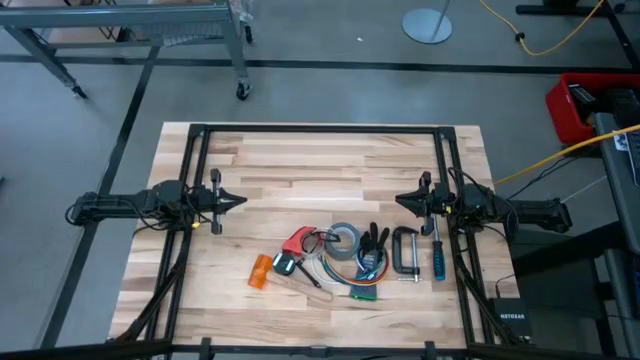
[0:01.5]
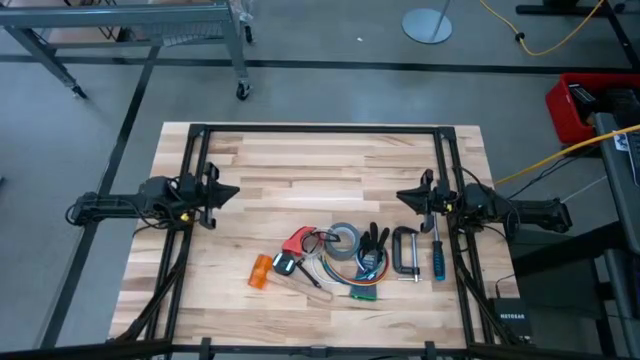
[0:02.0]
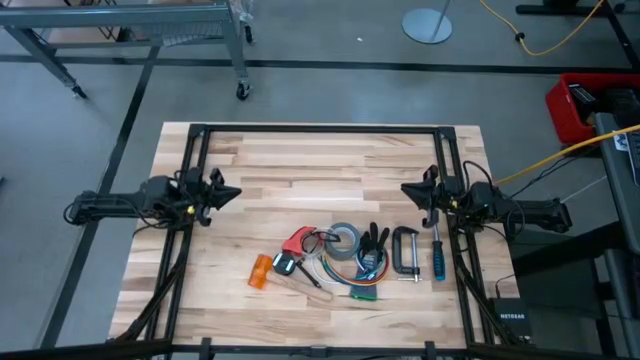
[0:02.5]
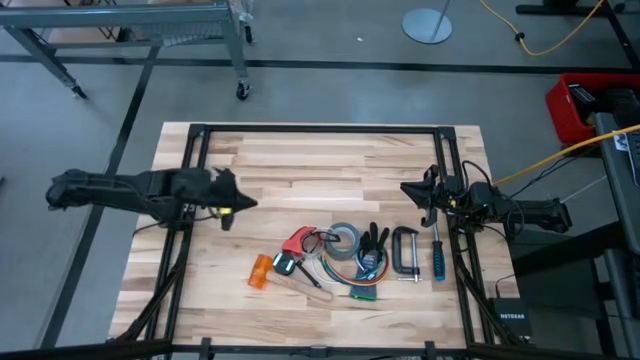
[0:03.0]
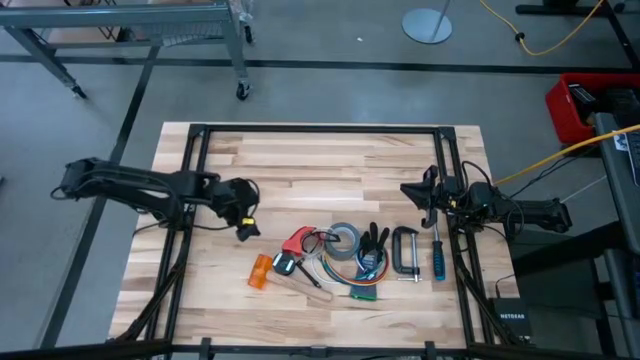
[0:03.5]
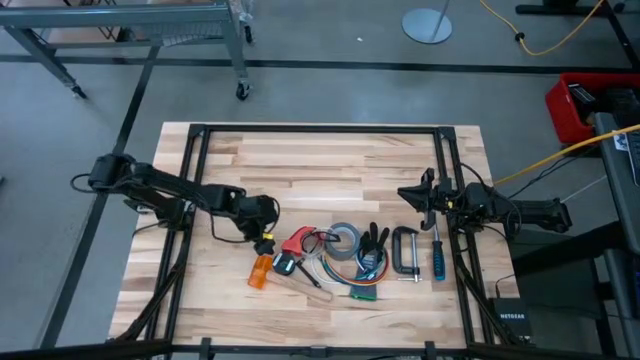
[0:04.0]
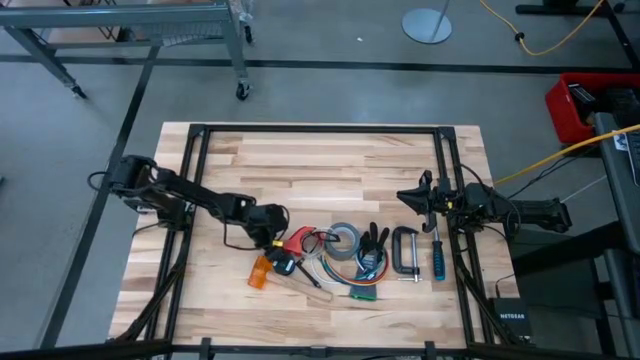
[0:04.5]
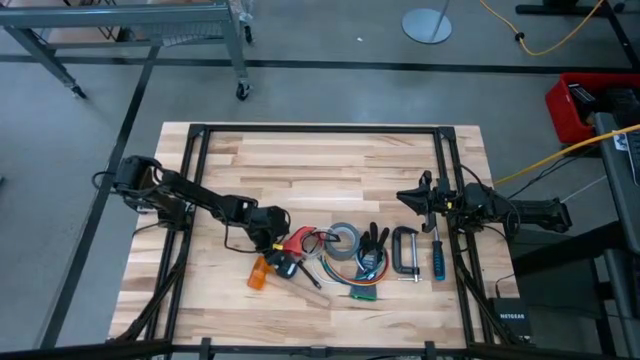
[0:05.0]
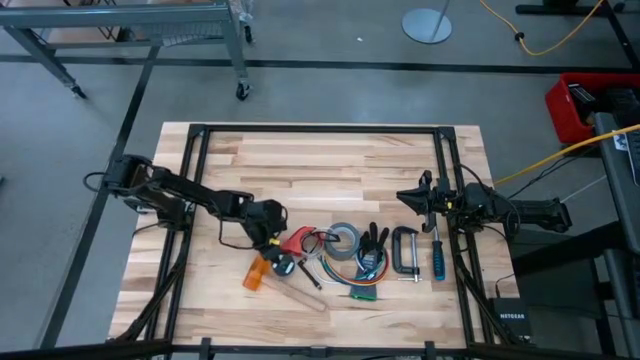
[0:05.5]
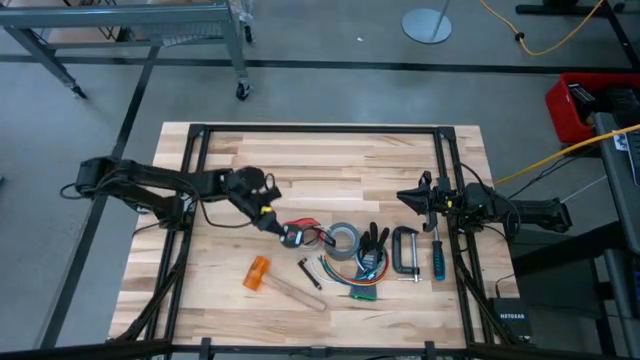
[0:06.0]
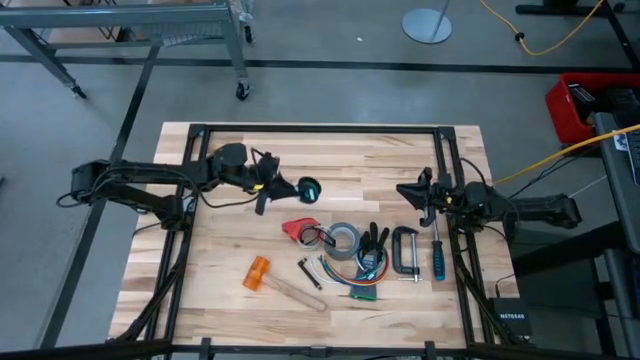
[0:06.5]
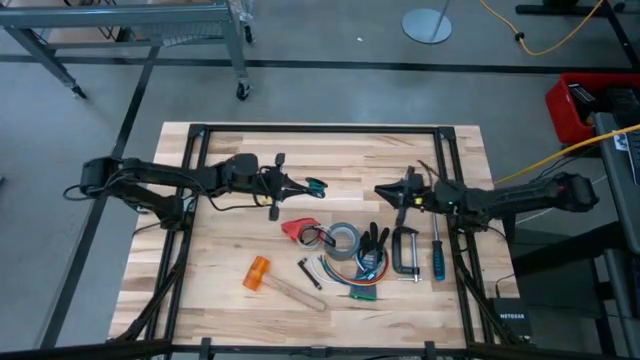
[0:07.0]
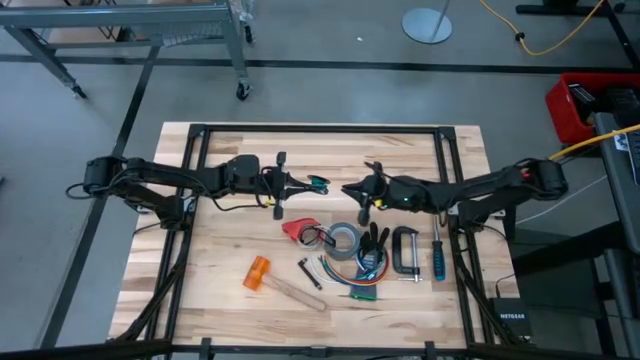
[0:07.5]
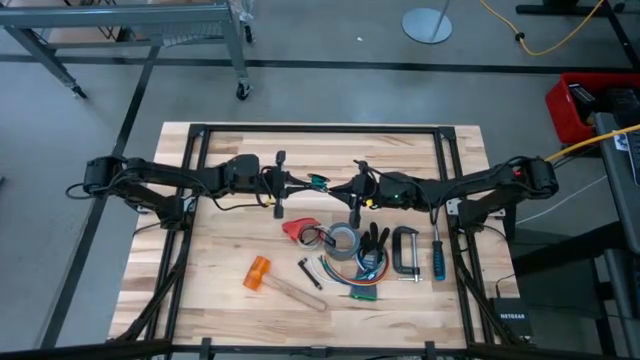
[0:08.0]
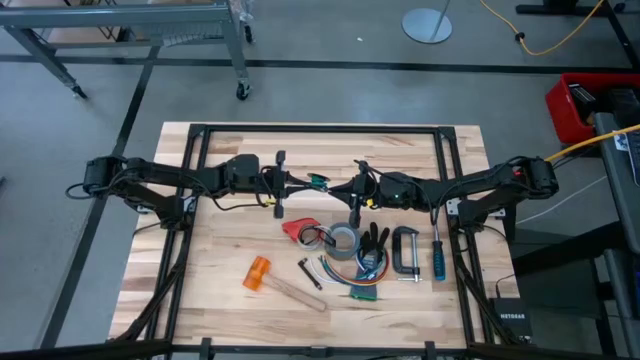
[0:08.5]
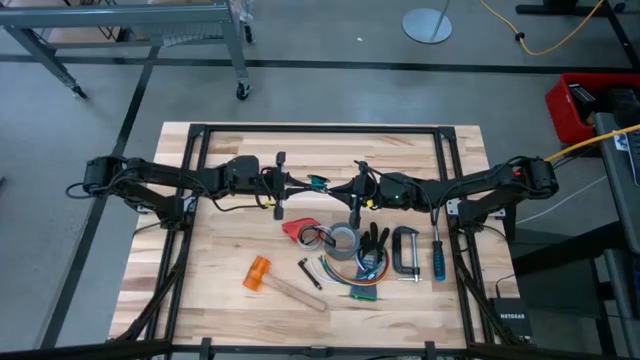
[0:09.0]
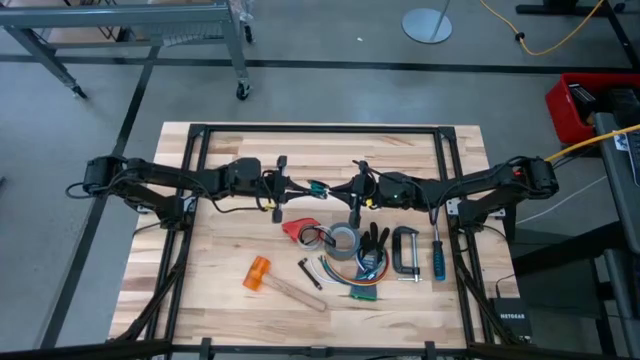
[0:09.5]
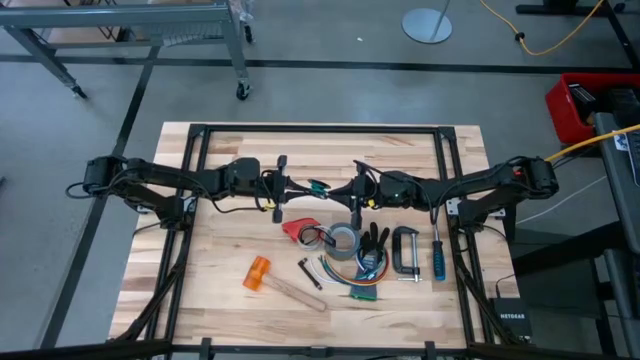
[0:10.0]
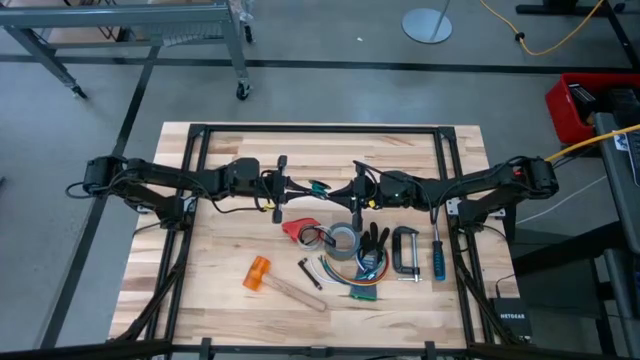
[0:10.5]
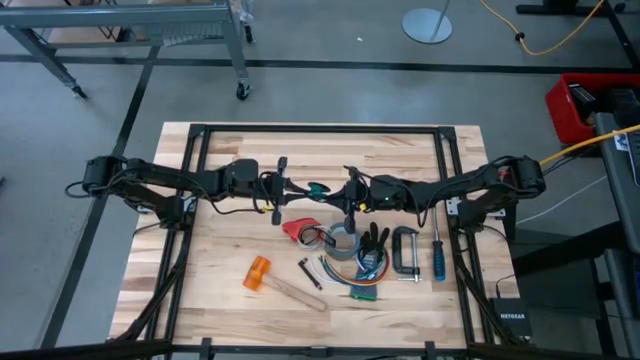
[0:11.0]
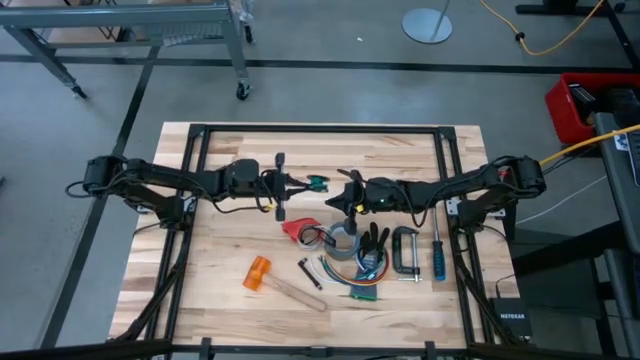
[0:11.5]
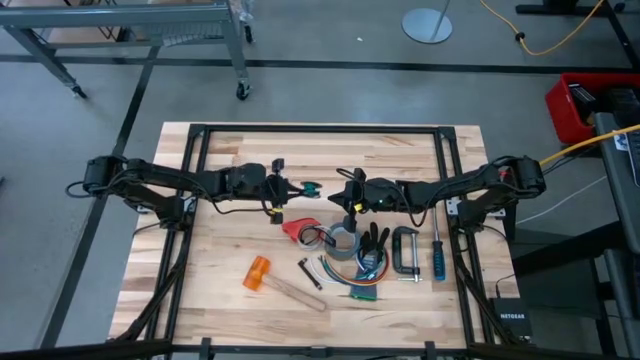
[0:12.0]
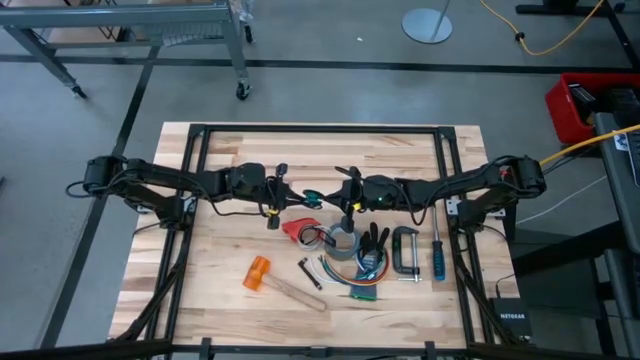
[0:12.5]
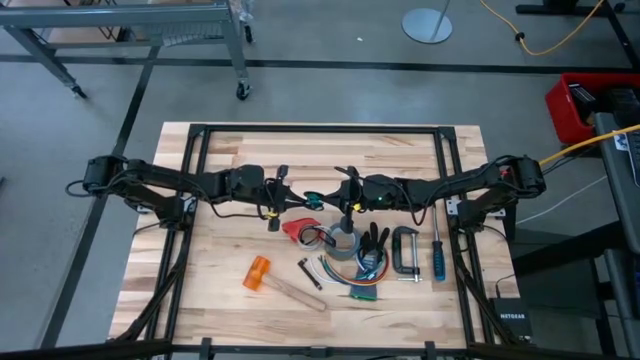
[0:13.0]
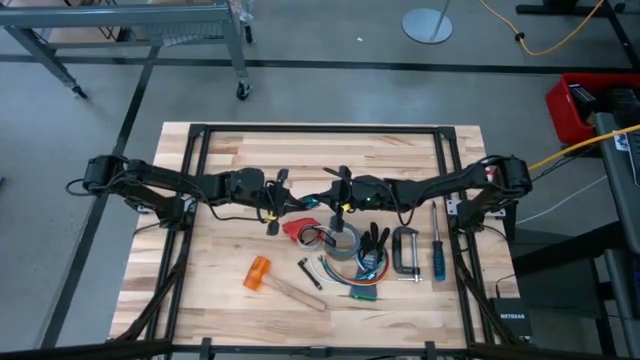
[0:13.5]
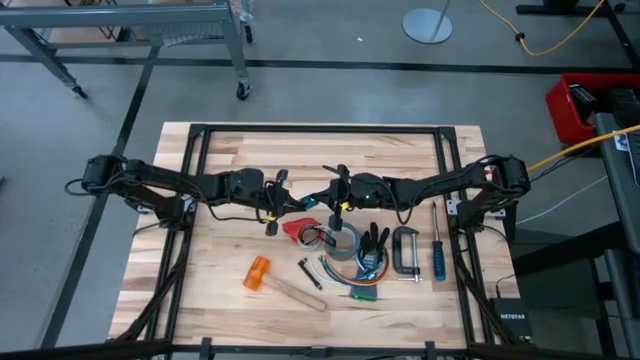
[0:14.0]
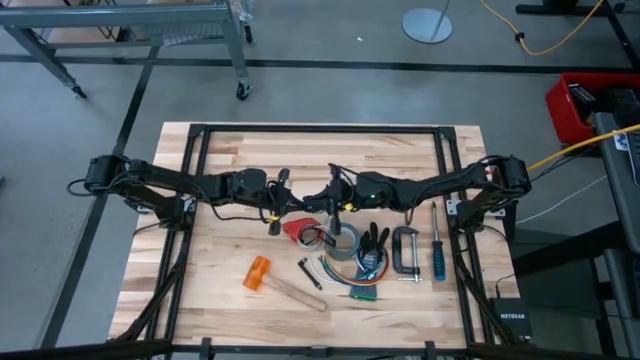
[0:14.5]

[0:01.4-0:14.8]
Task: Coil cords
Uncoil the green cable wire from the black spool

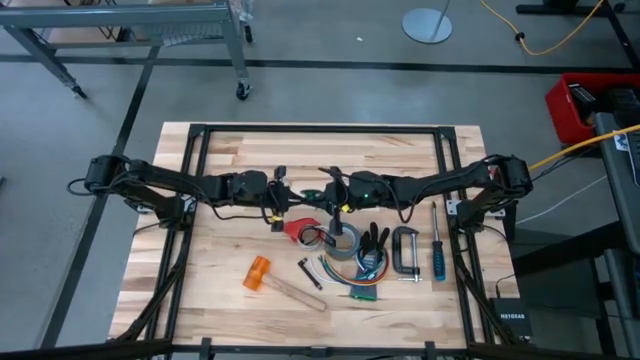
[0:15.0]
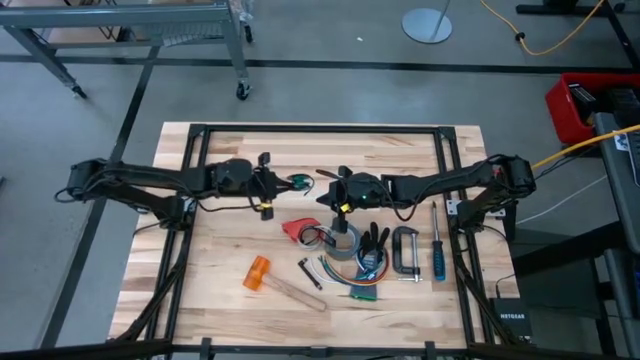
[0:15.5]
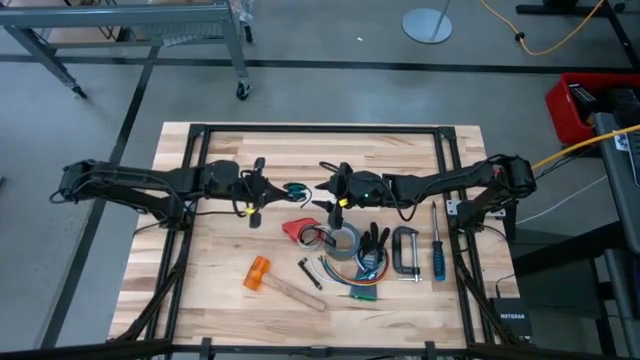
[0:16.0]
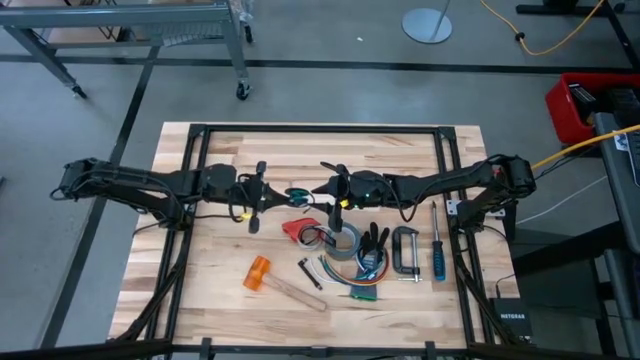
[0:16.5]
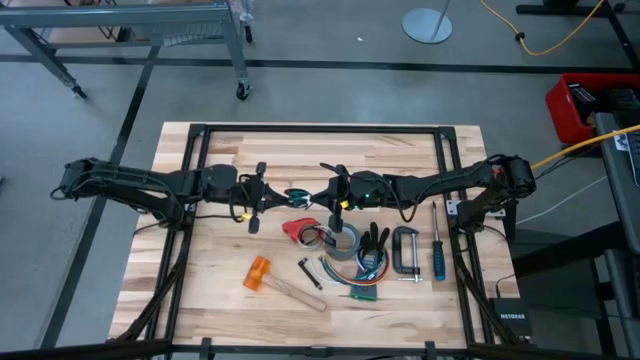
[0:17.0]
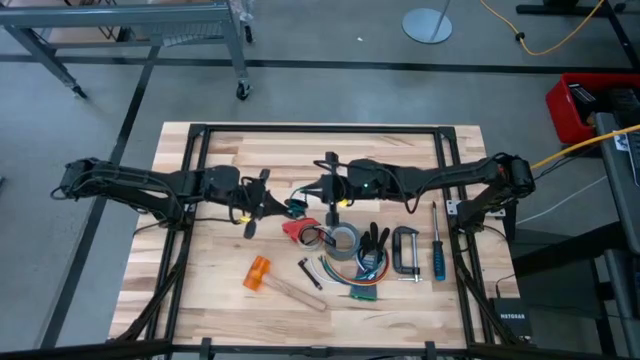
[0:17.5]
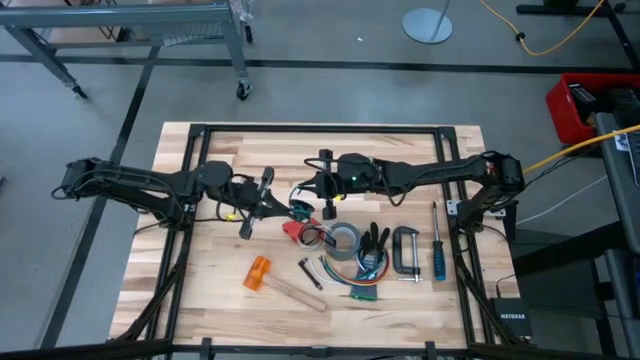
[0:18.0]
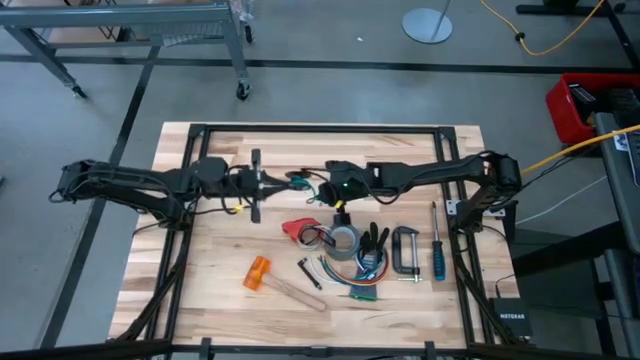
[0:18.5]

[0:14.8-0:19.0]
Uncoil the green cable wire from the black spool

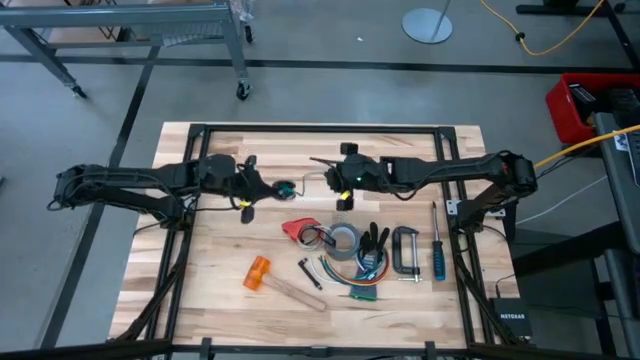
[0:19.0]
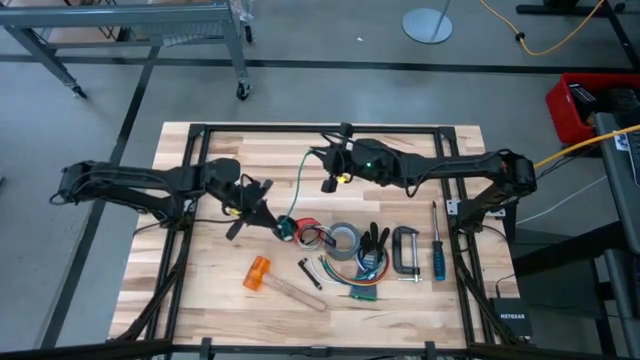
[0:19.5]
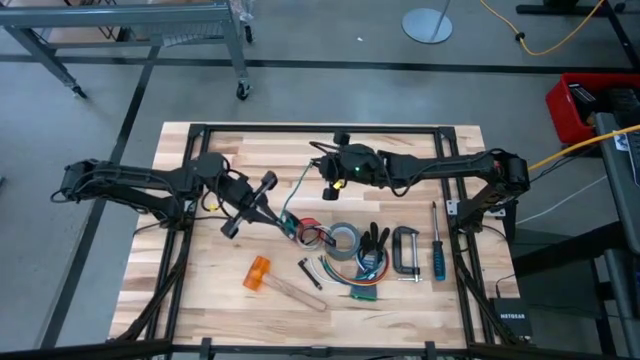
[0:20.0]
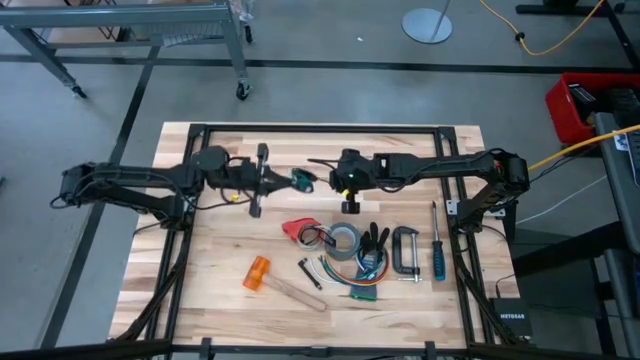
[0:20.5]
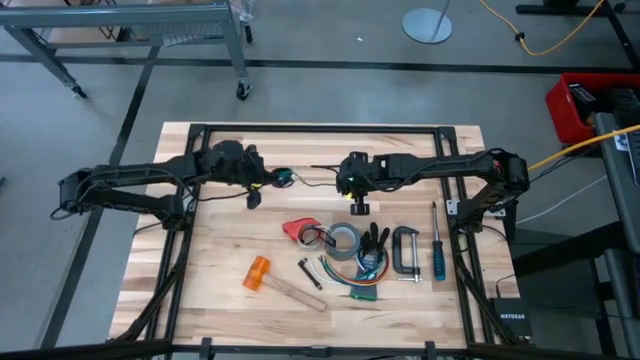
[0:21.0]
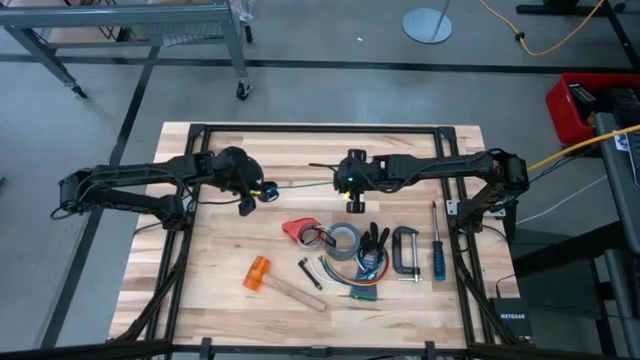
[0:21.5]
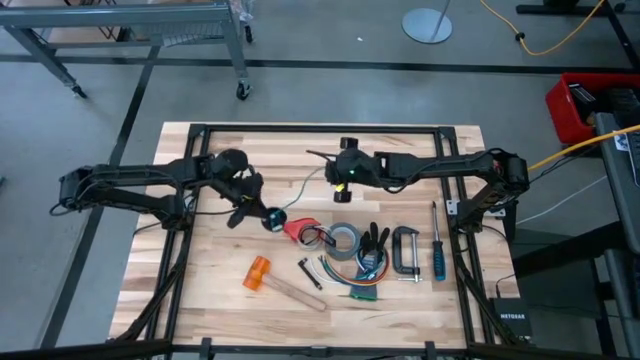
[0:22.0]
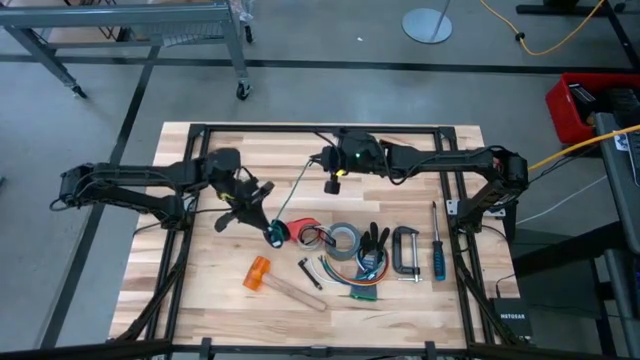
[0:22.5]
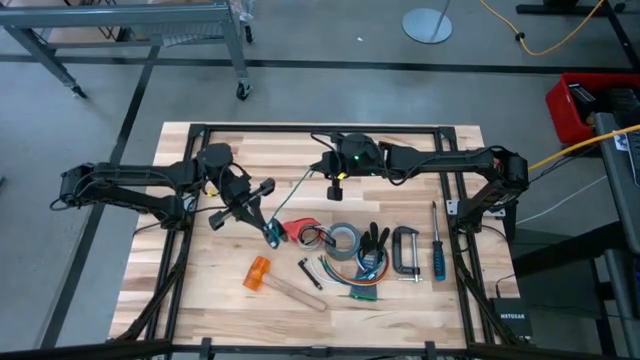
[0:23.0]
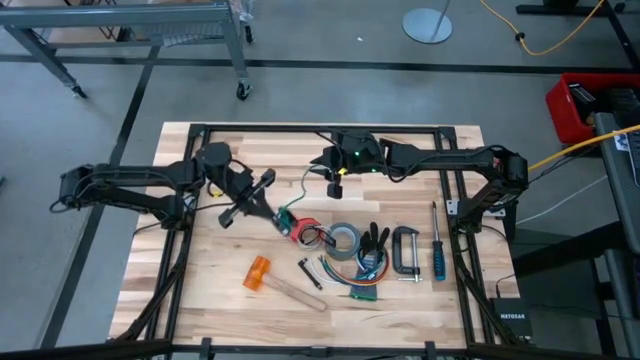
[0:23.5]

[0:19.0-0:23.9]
Uncoil the green cable wire from the black spool
